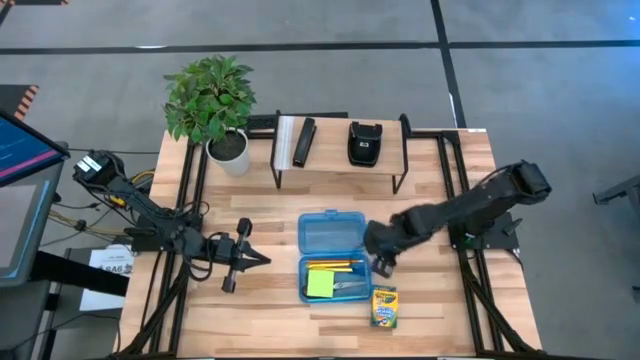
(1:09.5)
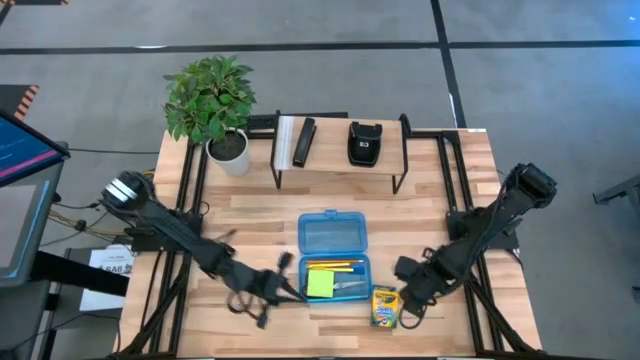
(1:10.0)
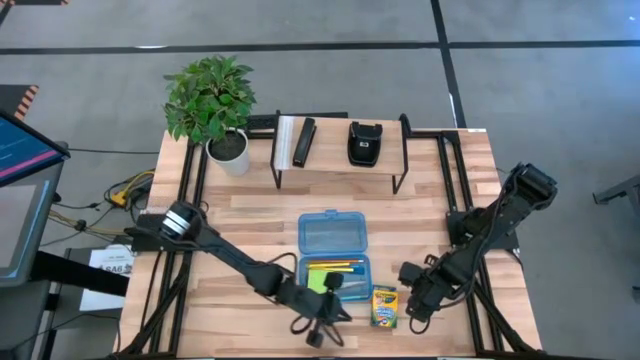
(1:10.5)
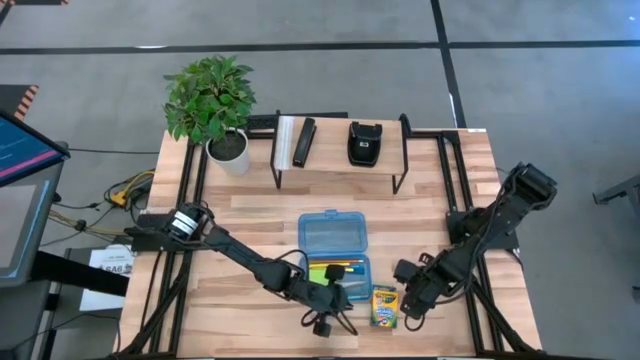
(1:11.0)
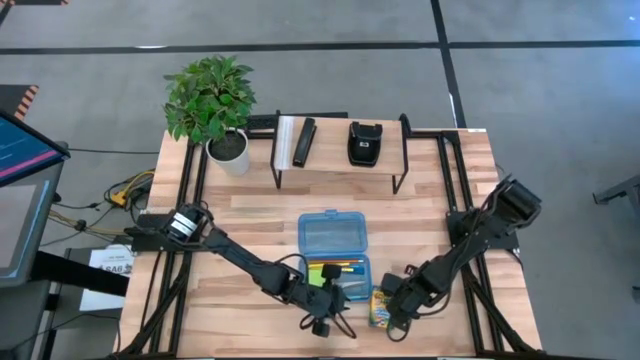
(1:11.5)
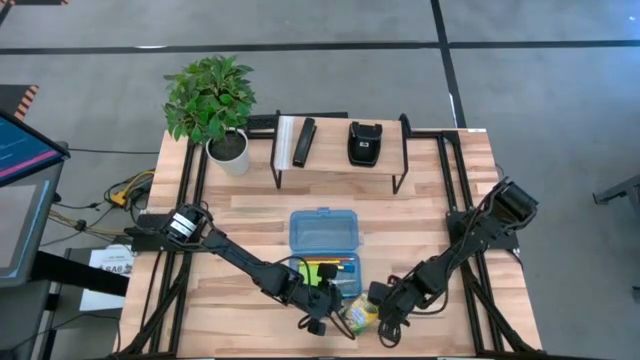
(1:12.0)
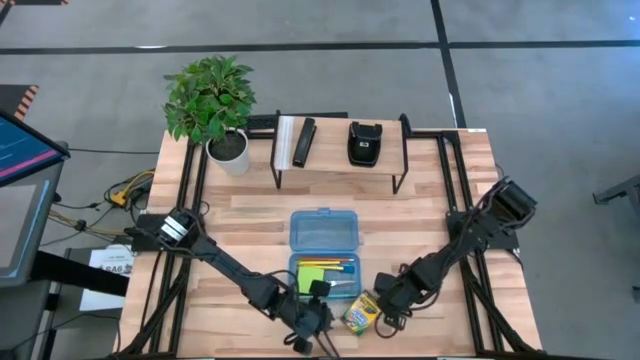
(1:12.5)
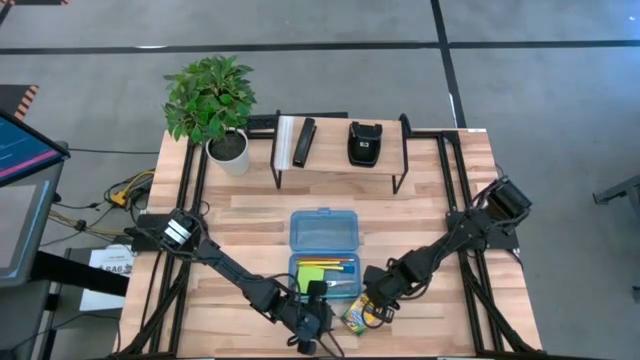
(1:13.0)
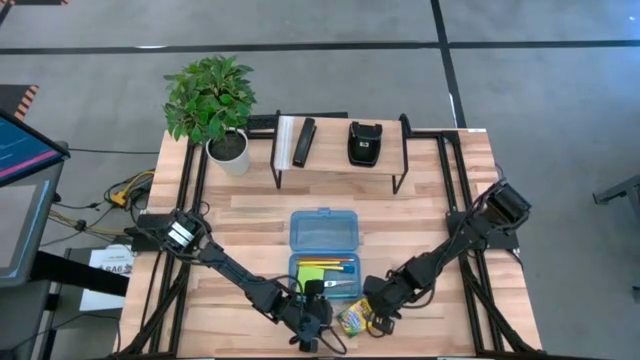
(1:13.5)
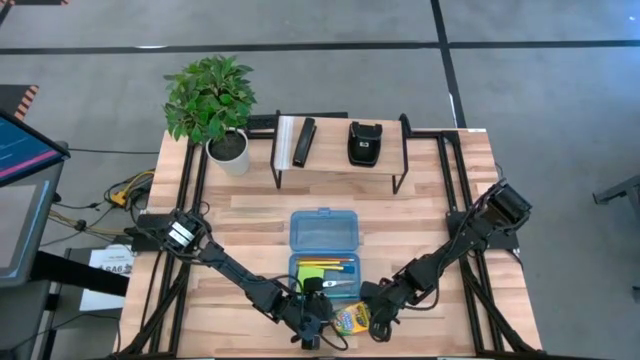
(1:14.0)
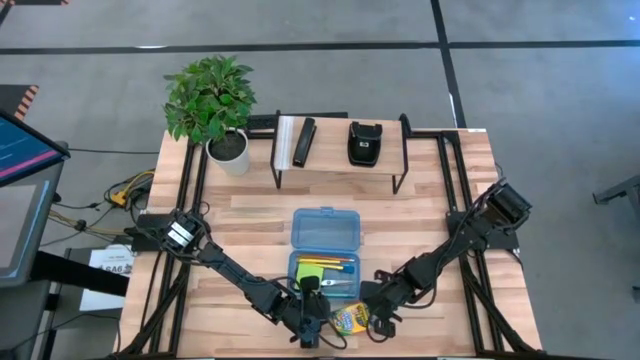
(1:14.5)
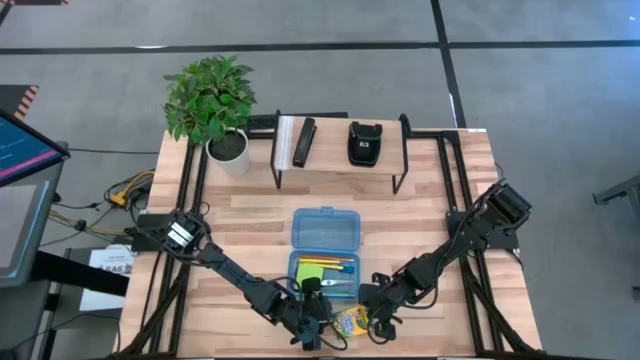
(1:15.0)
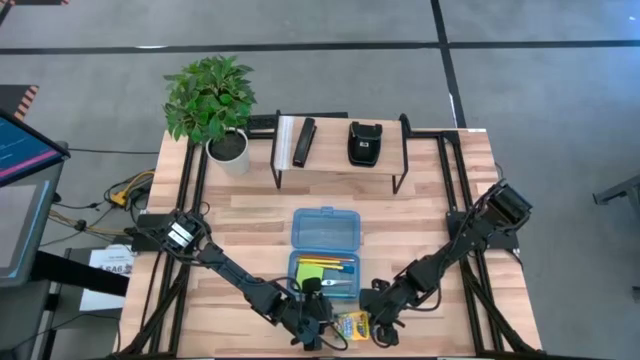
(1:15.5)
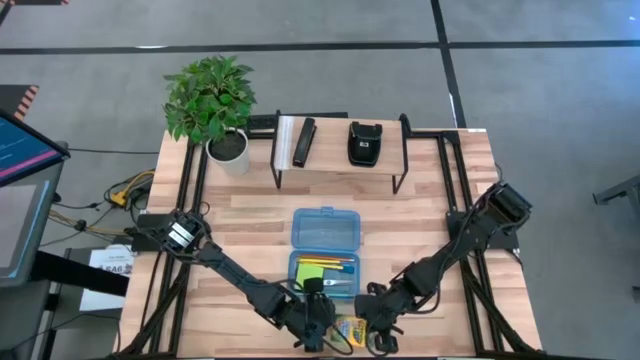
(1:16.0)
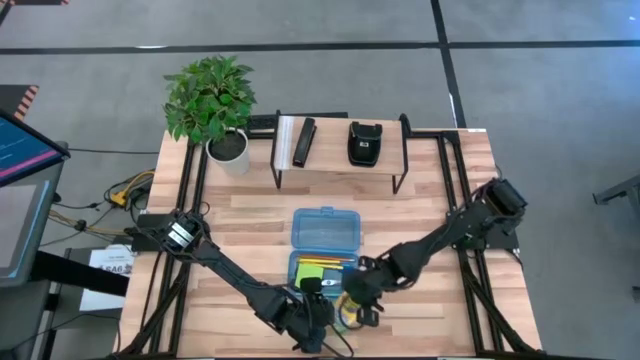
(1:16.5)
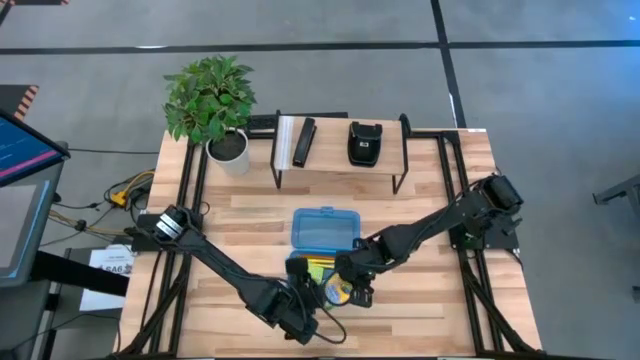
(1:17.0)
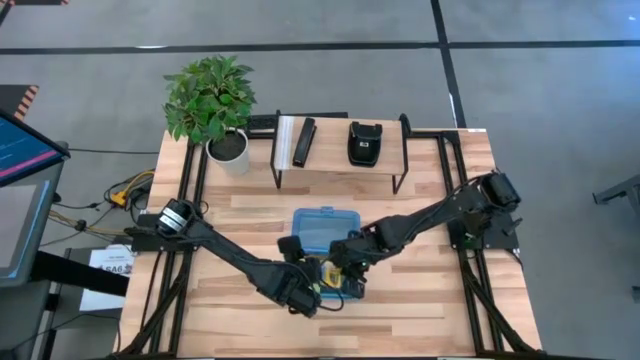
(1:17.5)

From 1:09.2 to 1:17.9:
Task: Pack school essentials
Put the crayon box into the supply box

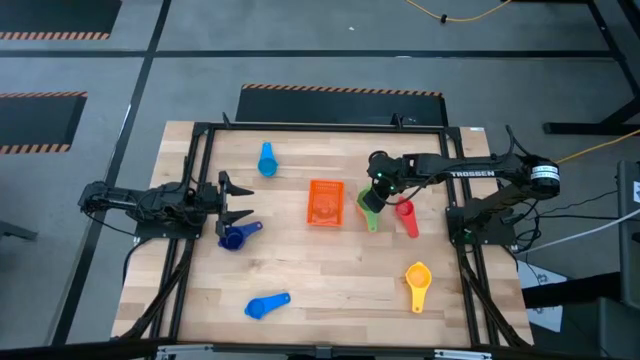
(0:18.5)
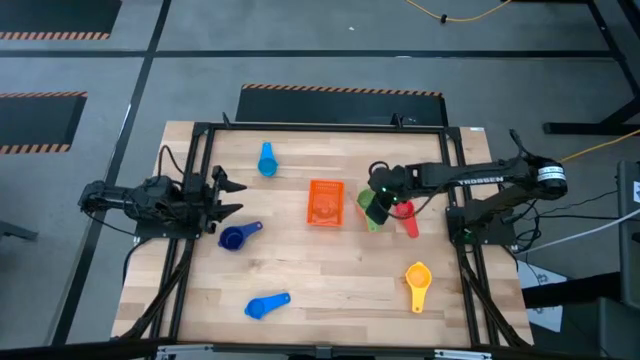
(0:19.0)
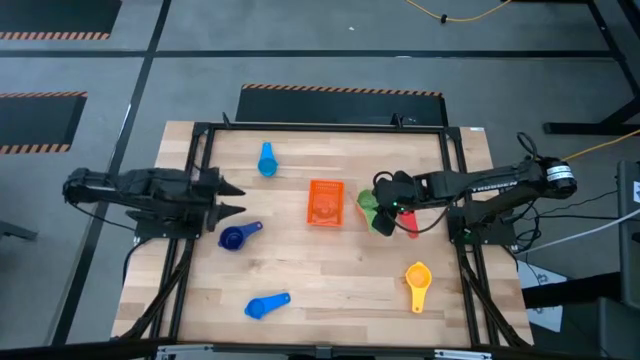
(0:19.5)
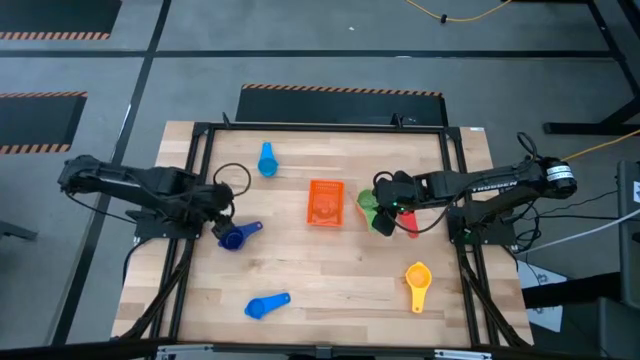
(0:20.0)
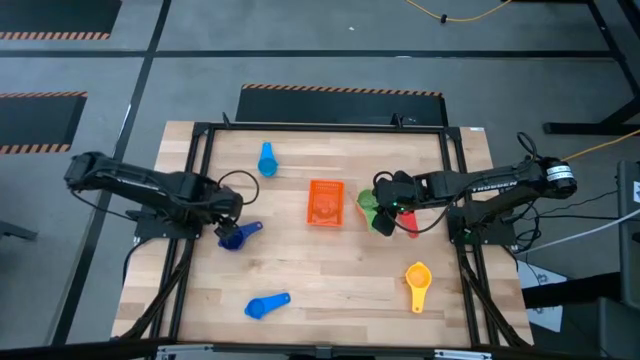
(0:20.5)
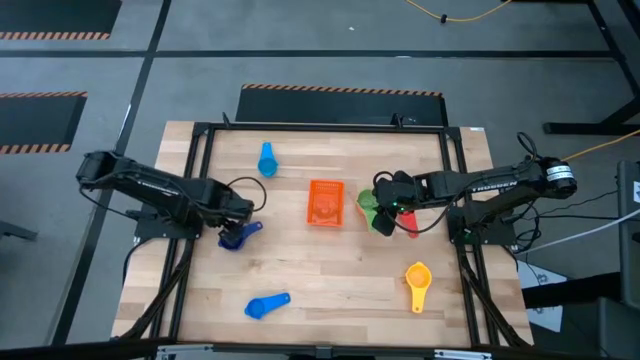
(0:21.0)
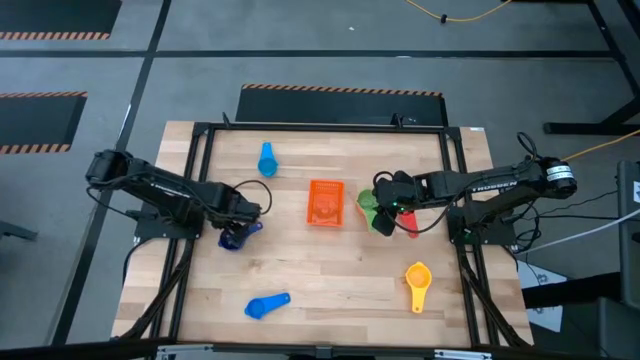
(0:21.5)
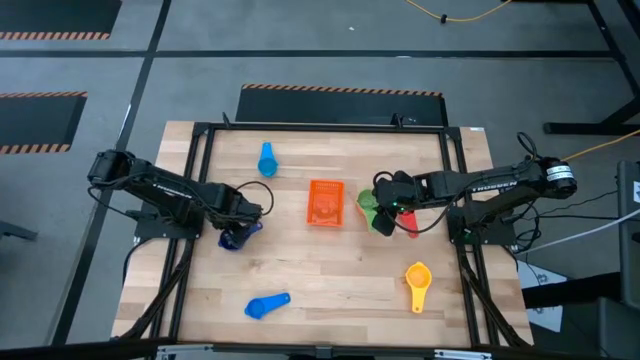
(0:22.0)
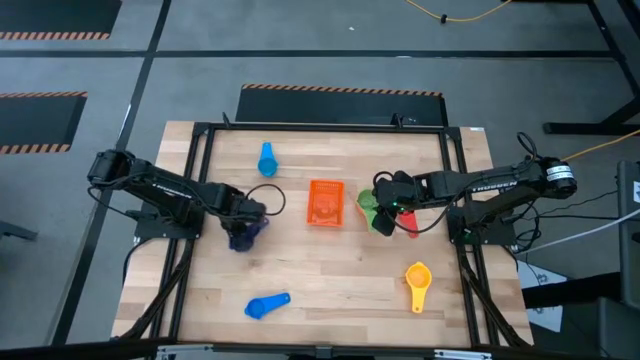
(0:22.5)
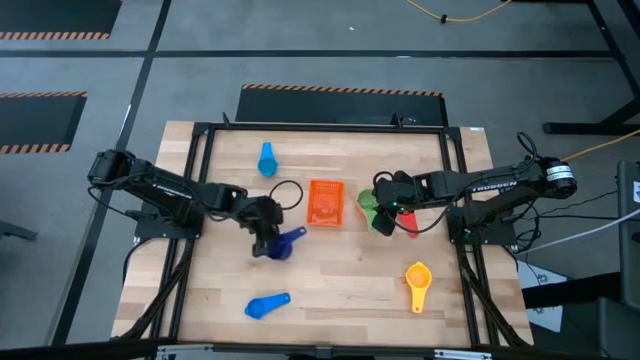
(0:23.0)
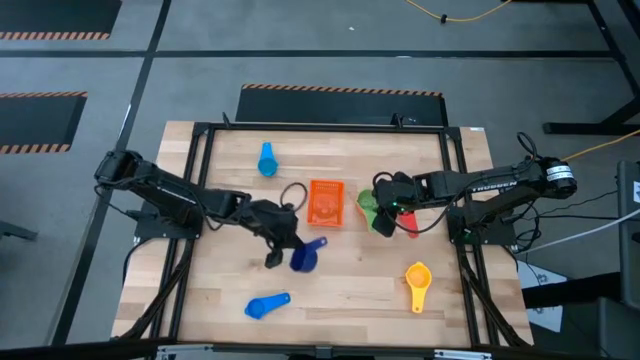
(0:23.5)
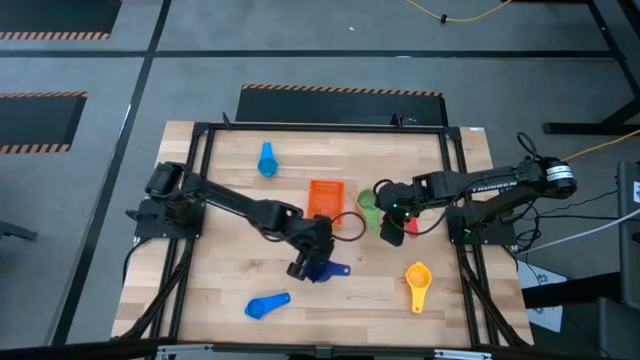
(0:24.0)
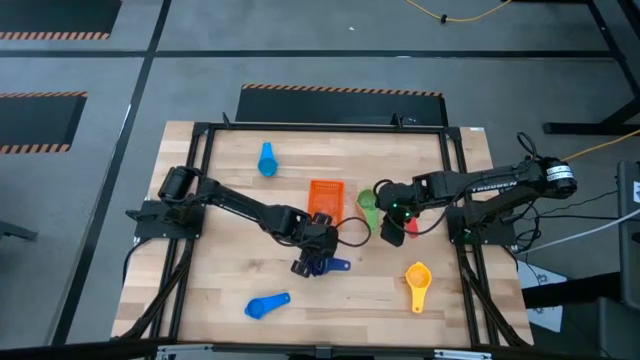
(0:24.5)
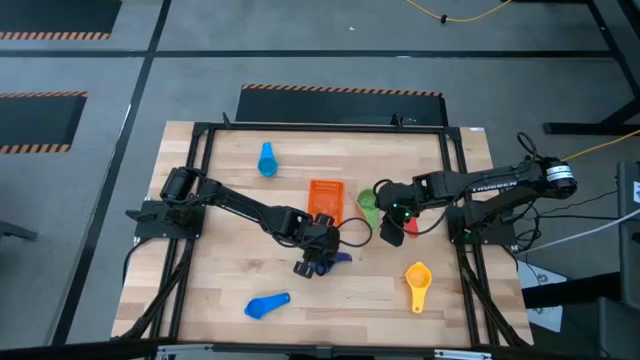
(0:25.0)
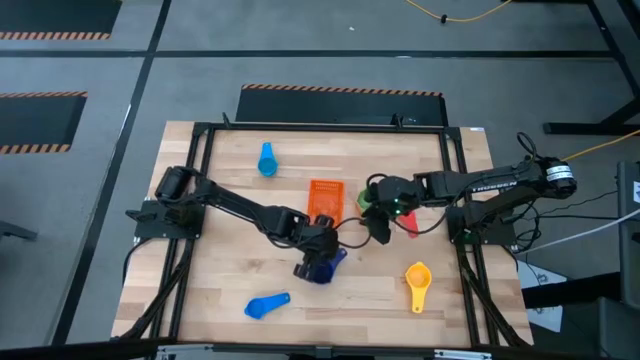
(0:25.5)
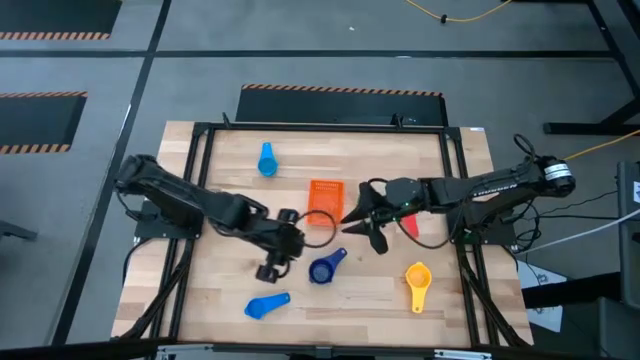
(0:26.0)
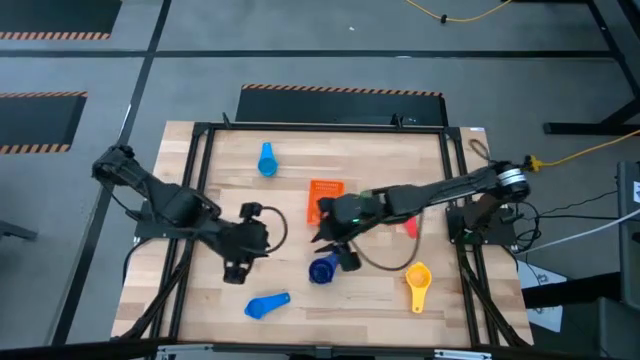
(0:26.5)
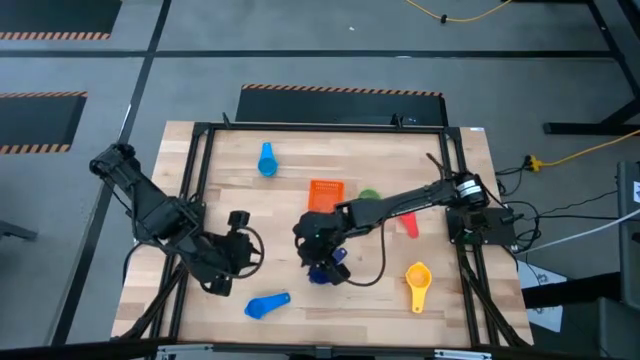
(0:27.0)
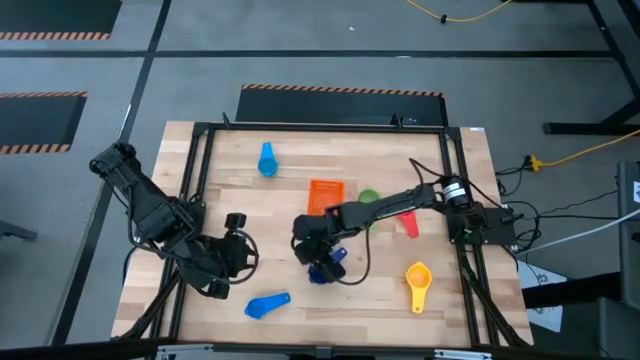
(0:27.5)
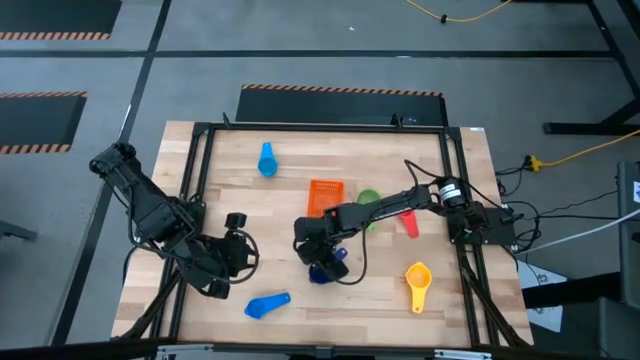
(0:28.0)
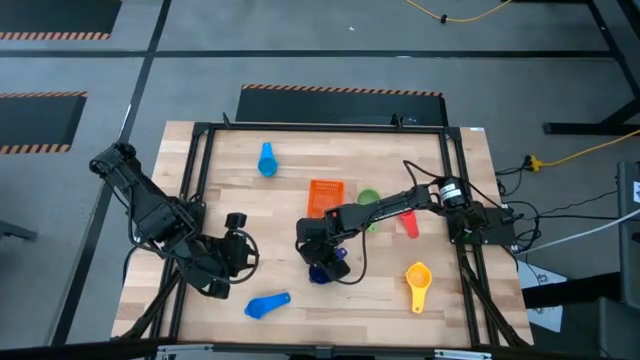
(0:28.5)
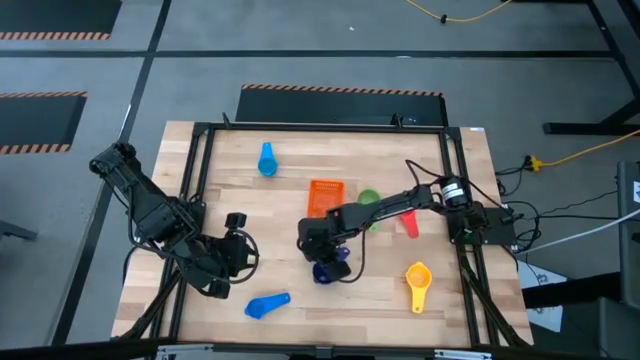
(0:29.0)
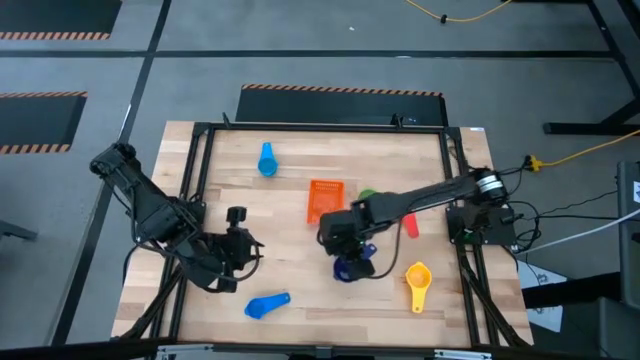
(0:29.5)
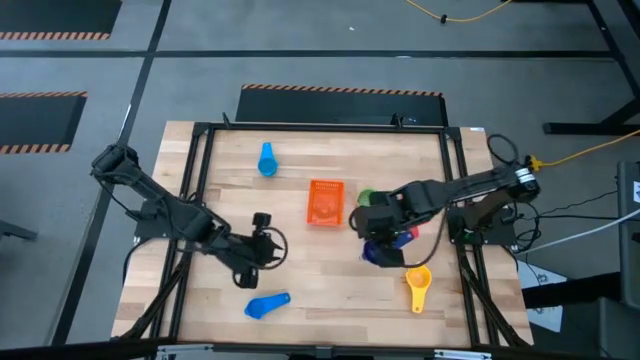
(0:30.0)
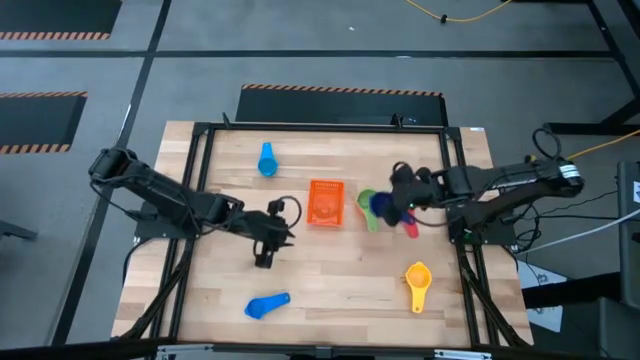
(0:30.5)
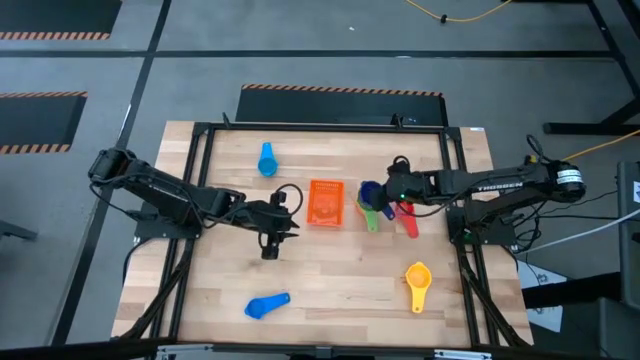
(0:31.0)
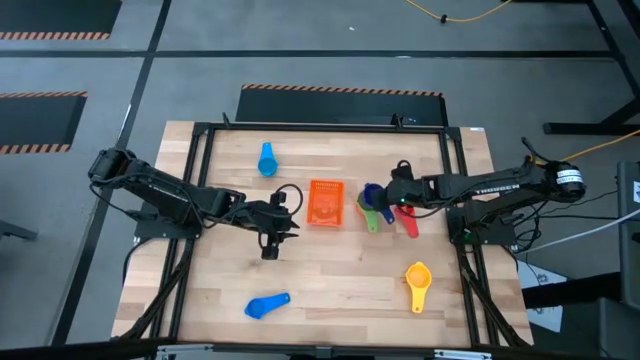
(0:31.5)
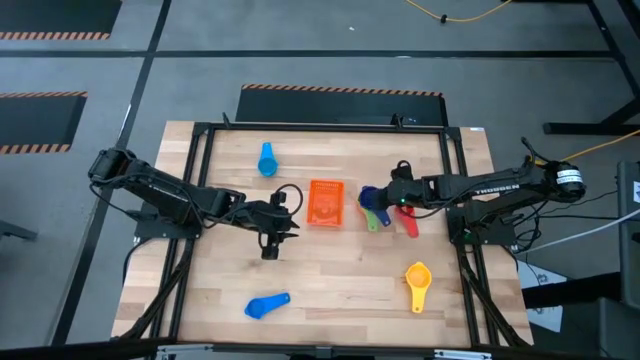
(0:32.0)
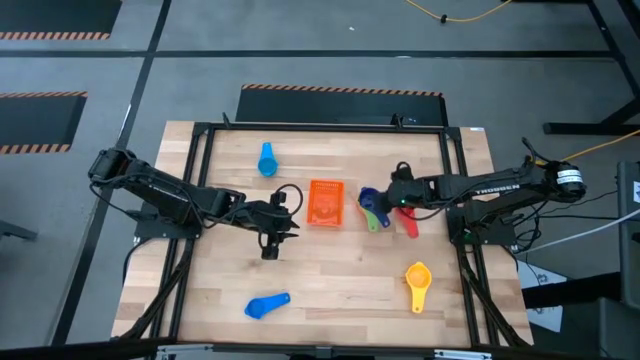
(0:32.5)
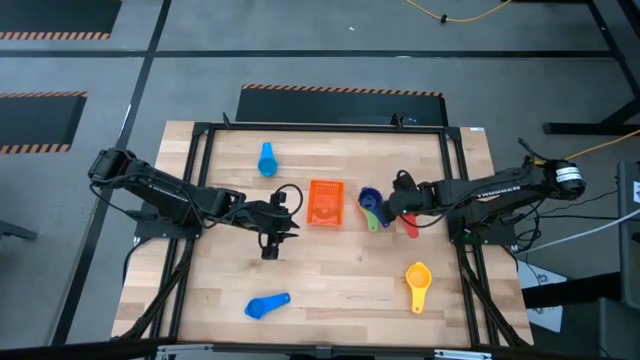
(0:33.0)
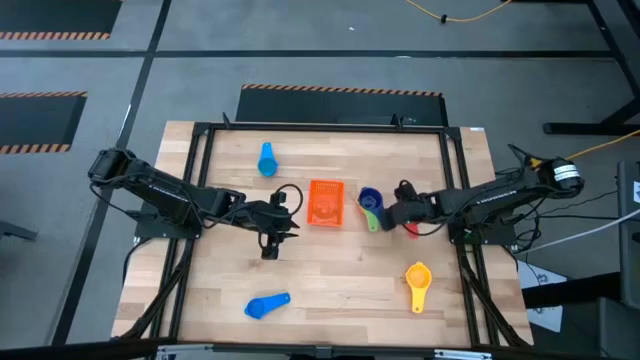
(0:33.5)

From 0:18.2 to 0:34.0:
Task: Nest measuring cups in basket
Stack the dark blue measuring cup on top of the green measuring cup
